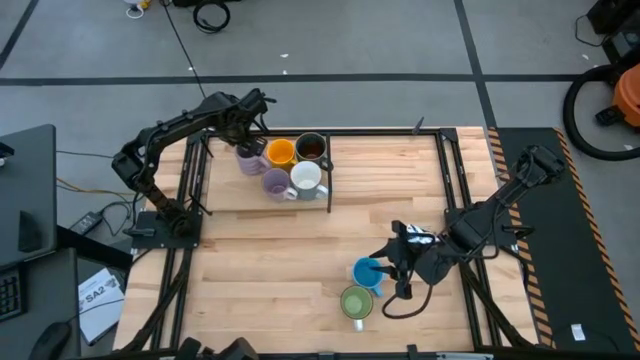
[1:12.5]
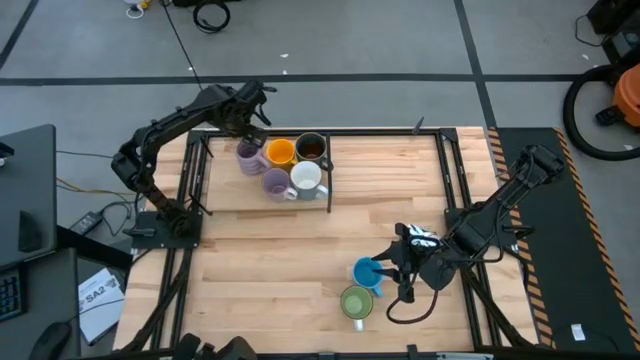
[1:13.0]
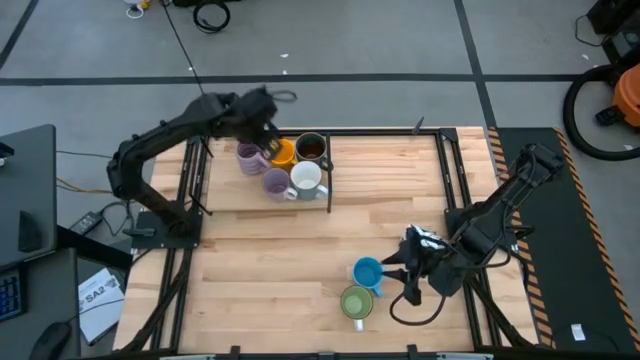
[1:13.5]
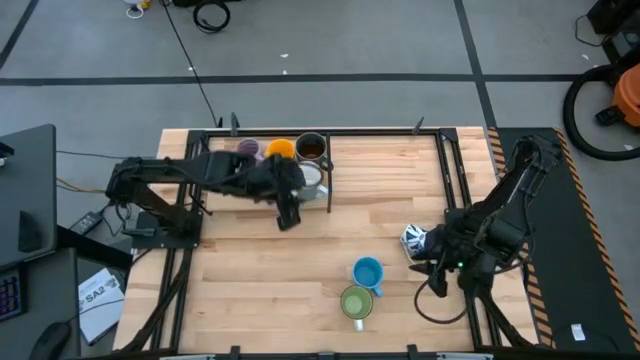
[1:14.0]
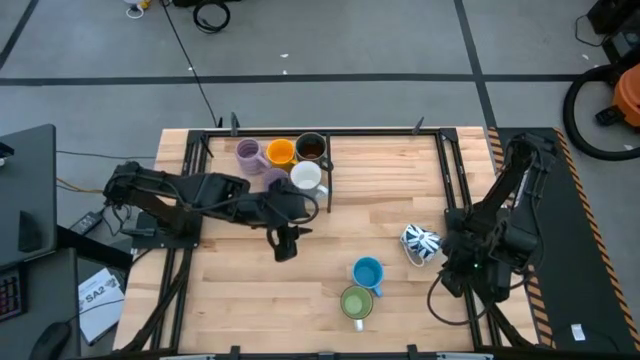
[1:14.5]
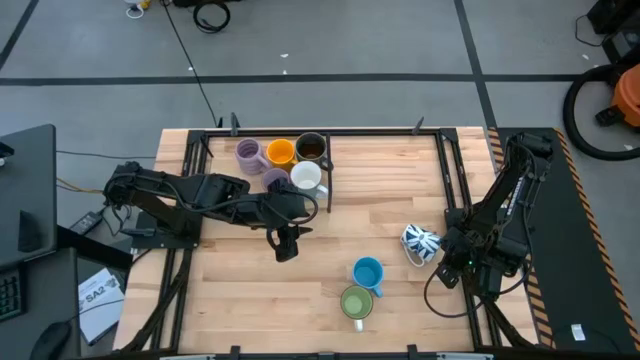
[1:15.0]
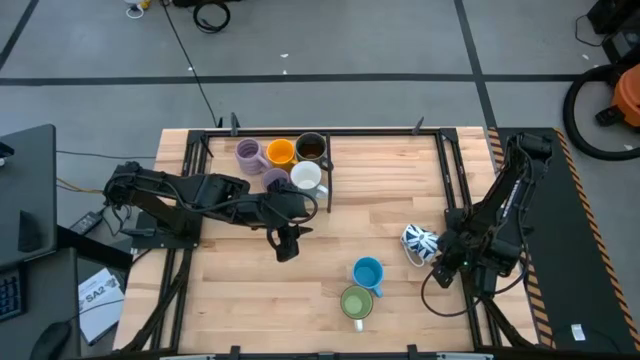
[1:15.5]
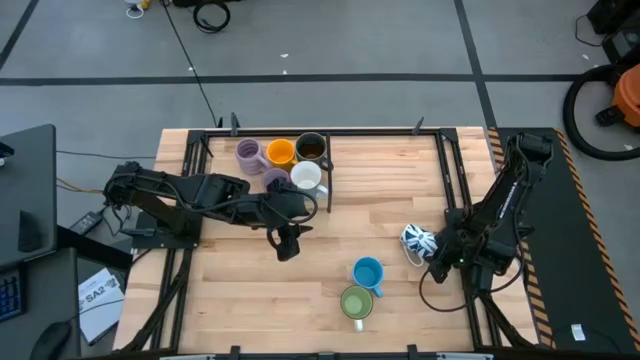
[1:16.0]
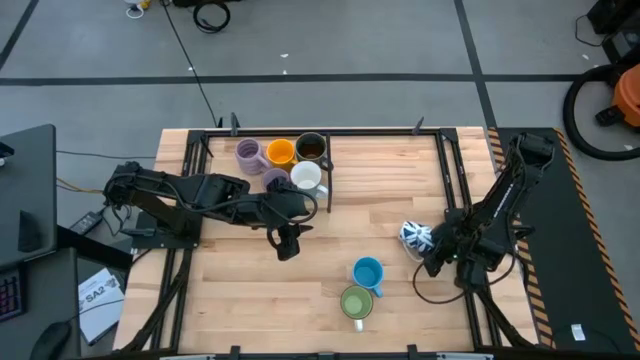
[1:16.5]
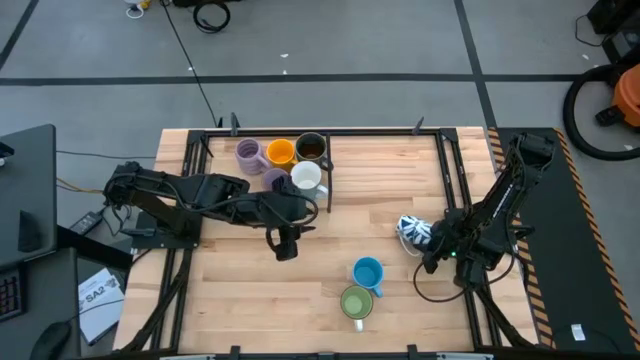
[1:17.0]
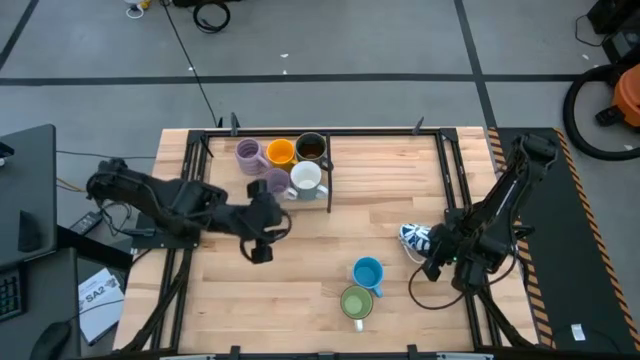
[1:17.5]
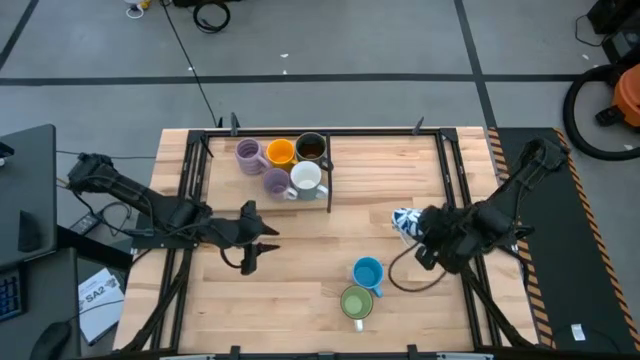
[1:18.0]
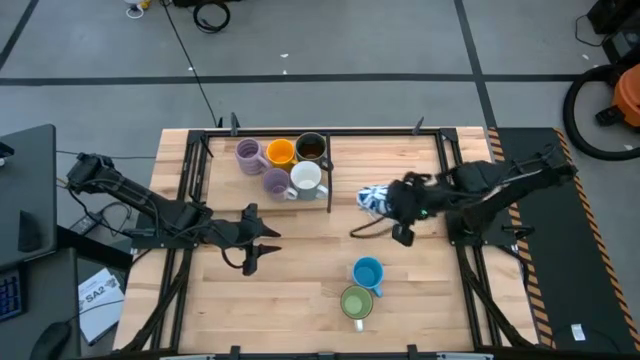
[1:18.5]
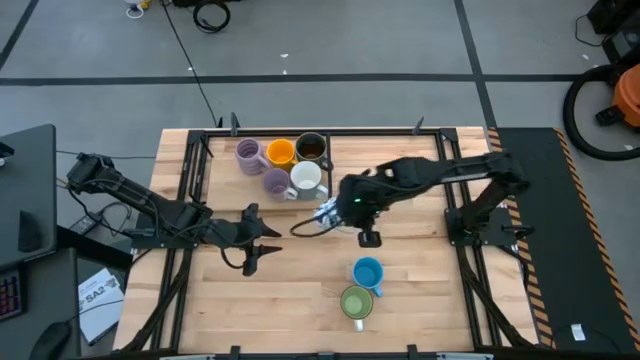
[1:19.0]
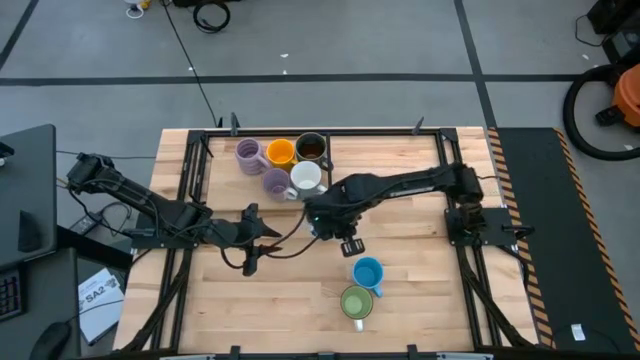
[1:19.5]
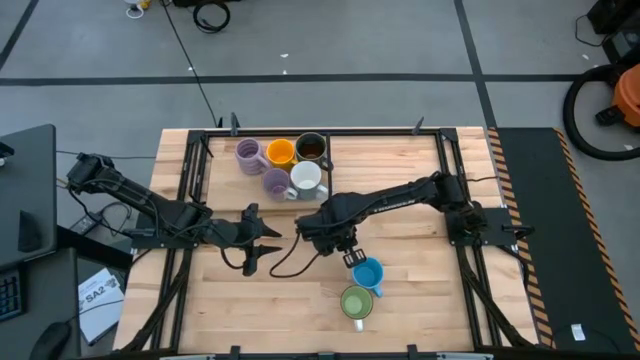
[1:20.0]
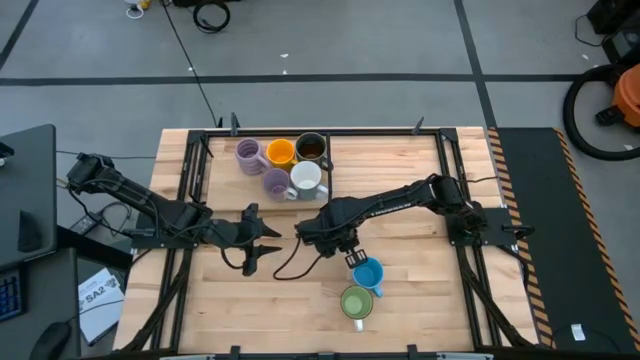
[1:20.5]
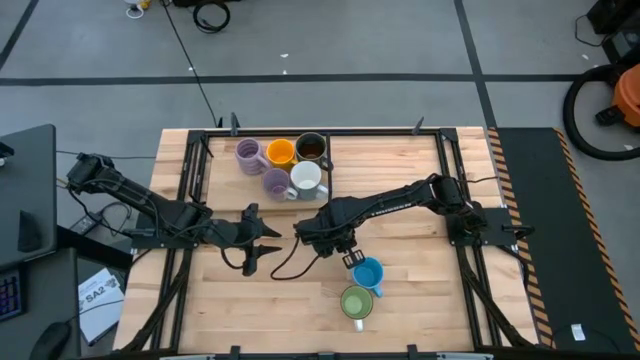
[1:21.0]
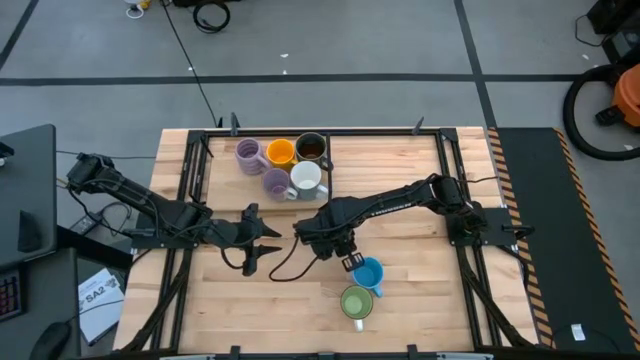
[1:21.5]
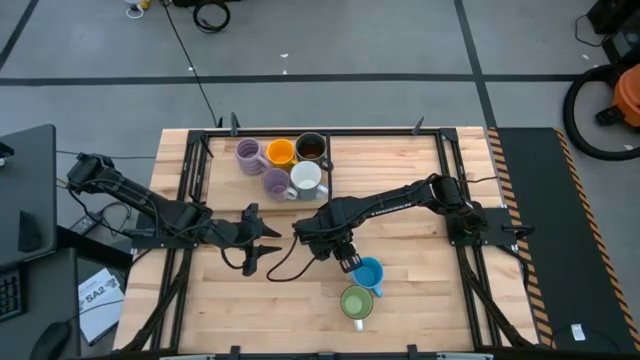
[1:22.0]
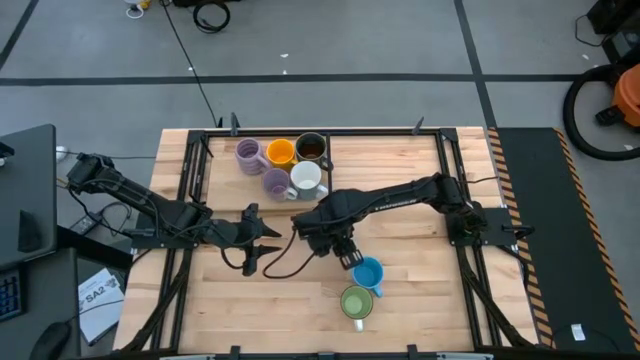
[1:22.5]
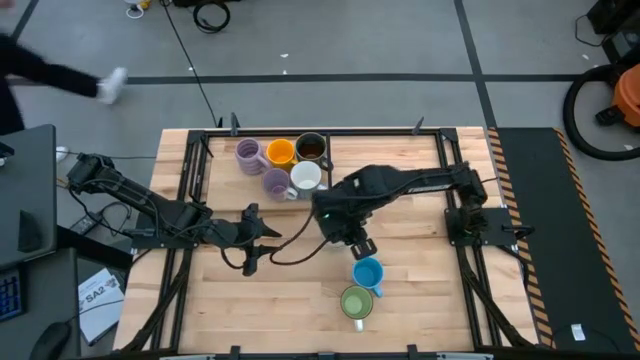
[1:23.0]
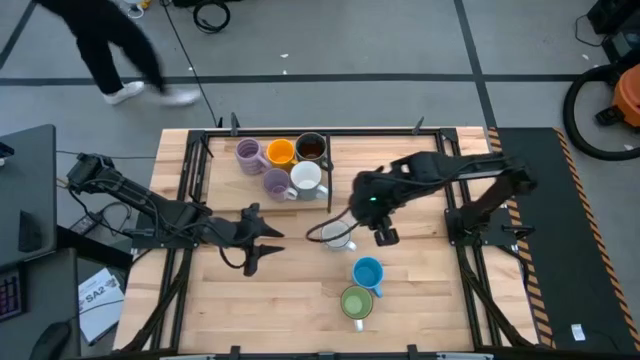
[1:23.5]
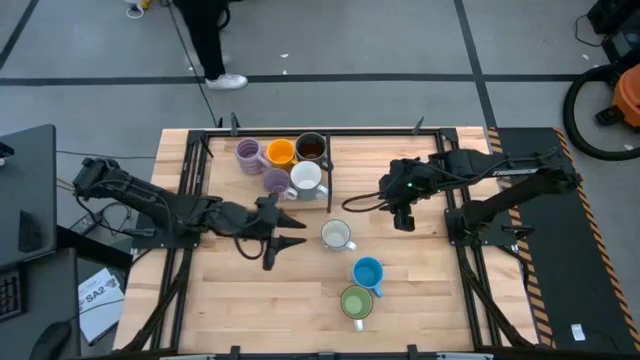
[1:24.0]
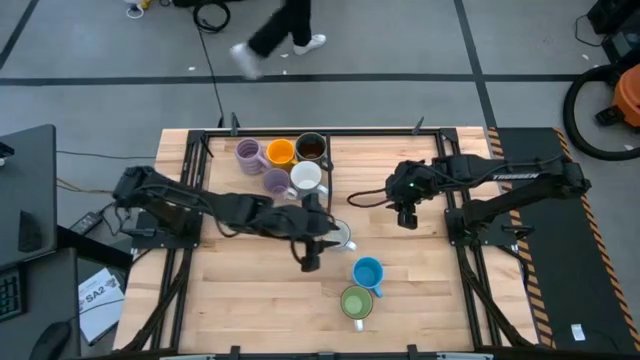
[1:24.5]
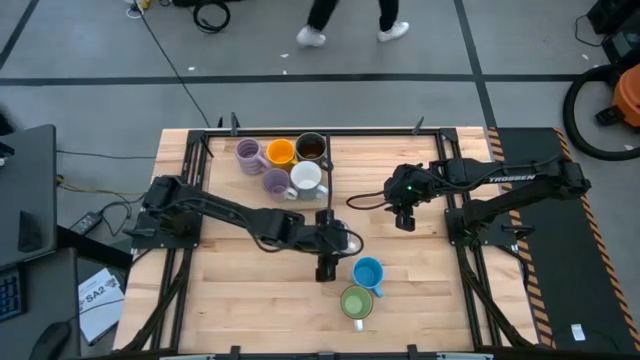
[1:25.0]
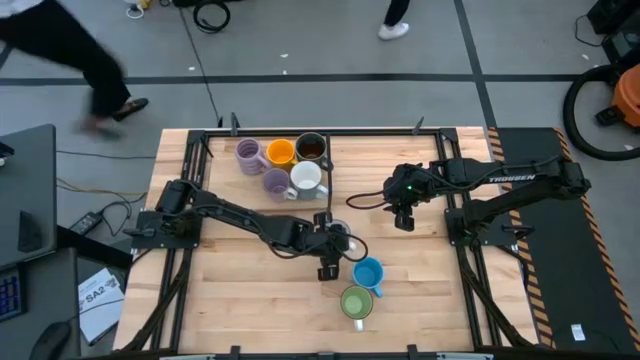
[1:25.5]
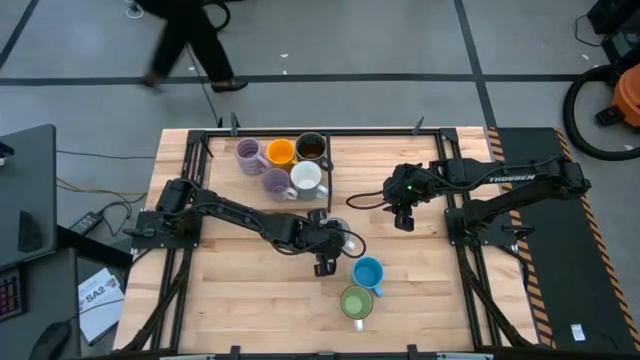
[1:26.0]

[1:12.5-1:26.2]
Task: Place coffee mugs
Put the patterned blue mug on the shelf

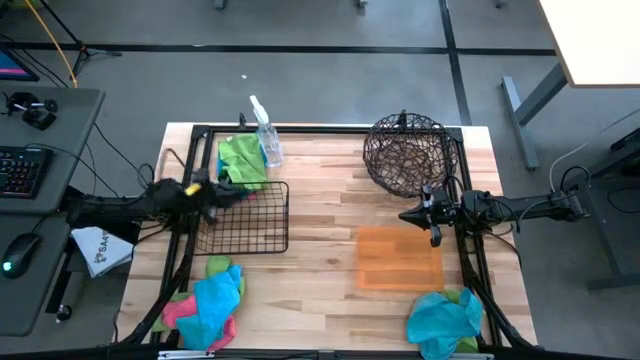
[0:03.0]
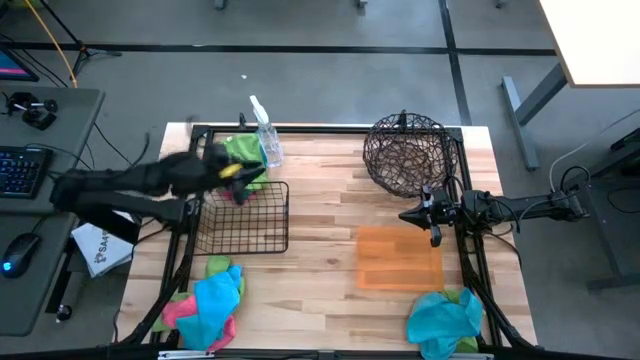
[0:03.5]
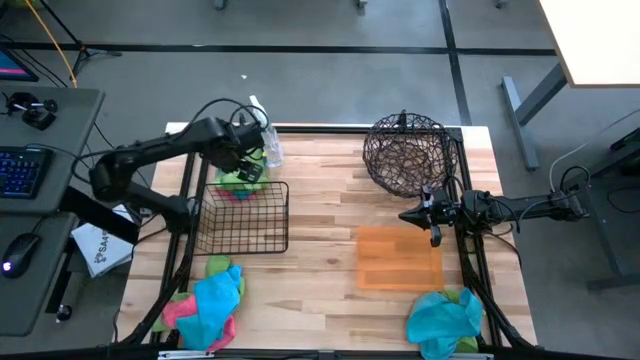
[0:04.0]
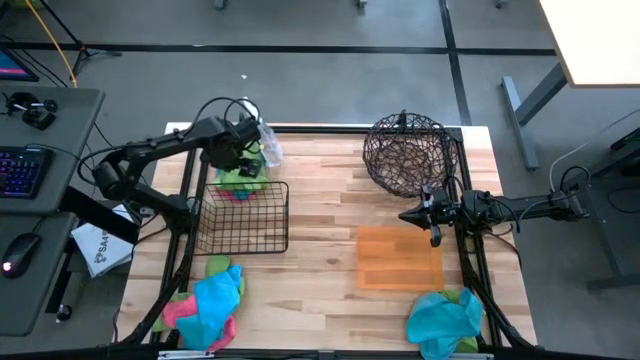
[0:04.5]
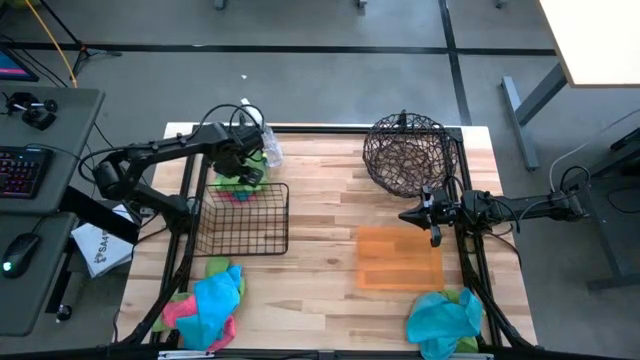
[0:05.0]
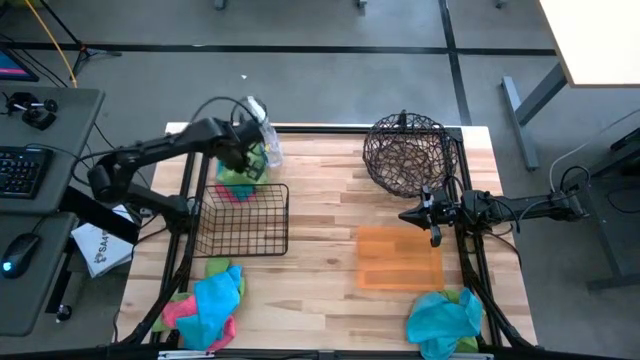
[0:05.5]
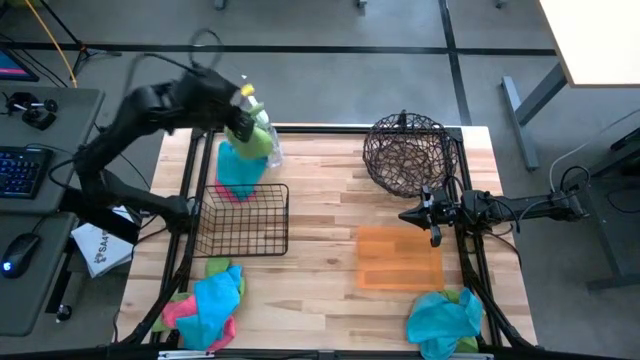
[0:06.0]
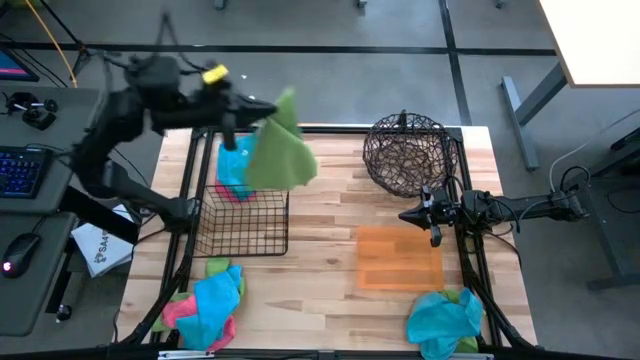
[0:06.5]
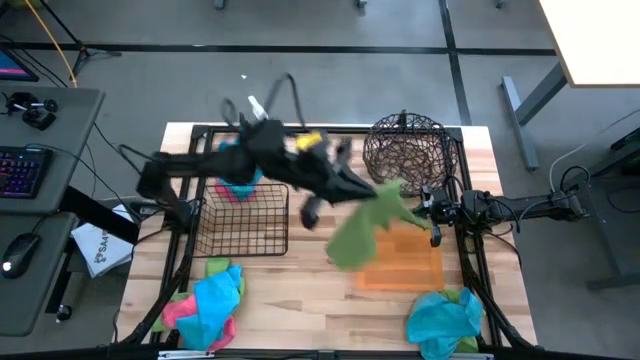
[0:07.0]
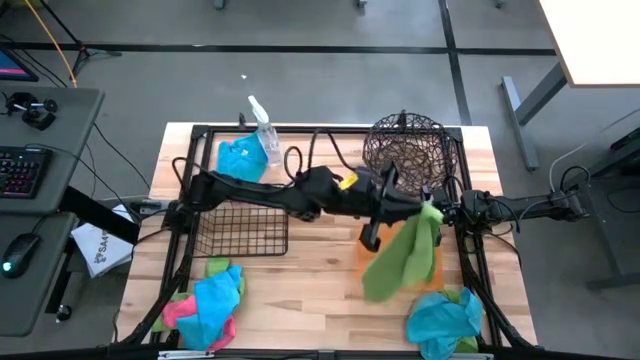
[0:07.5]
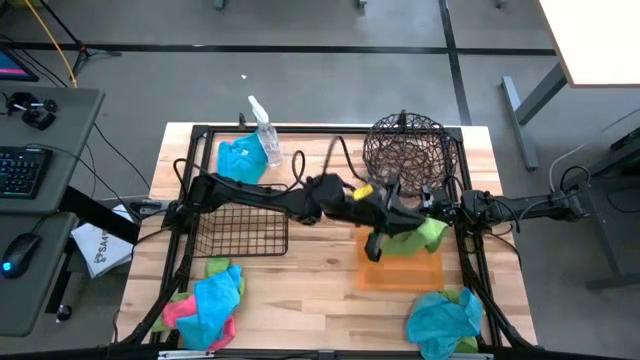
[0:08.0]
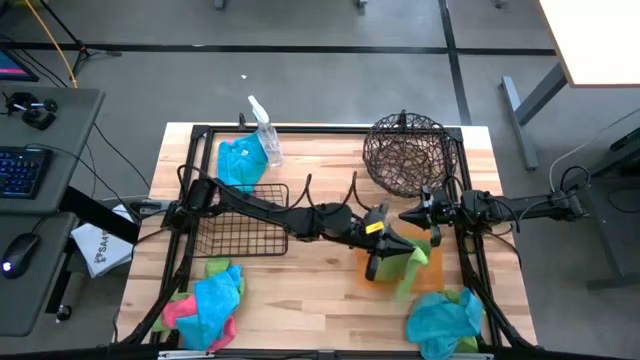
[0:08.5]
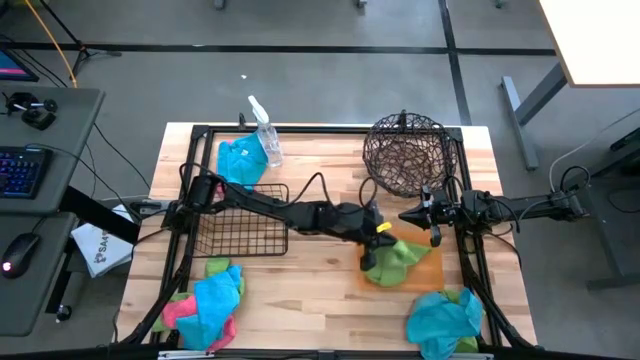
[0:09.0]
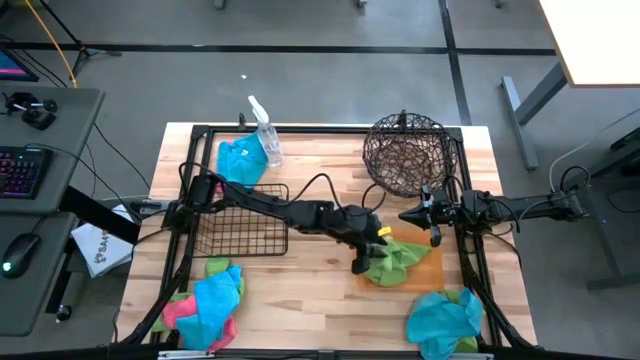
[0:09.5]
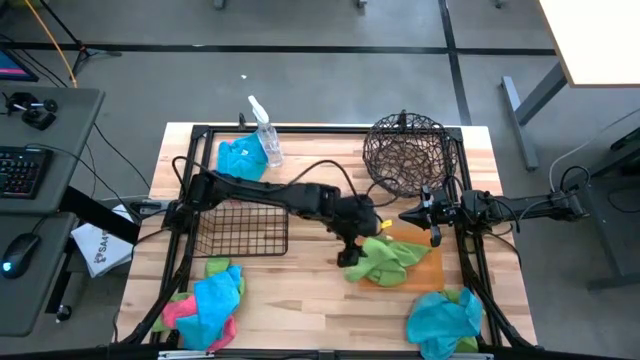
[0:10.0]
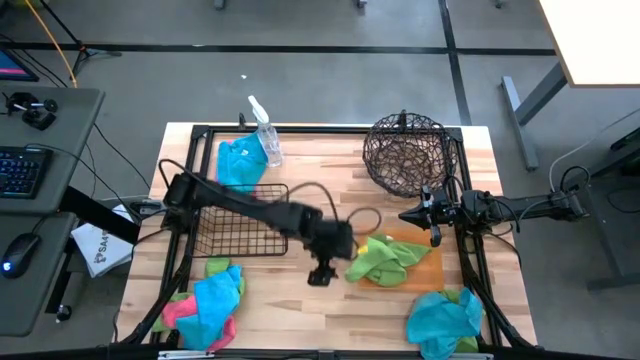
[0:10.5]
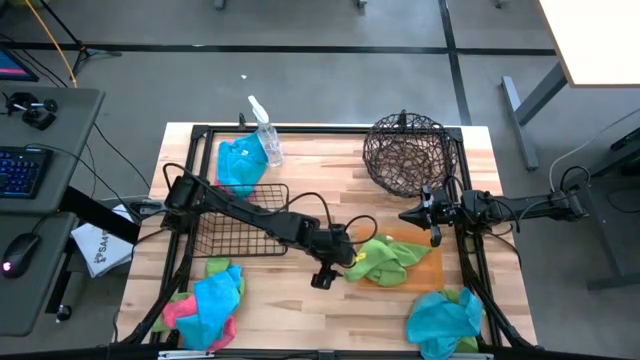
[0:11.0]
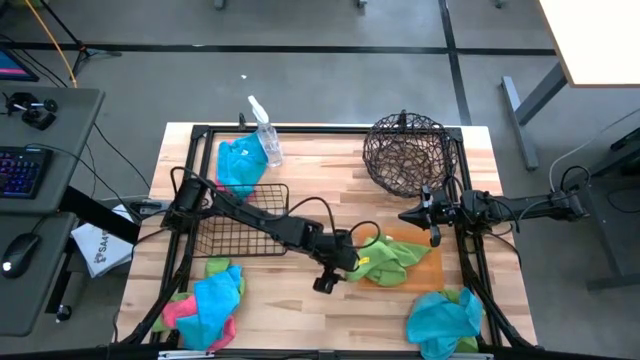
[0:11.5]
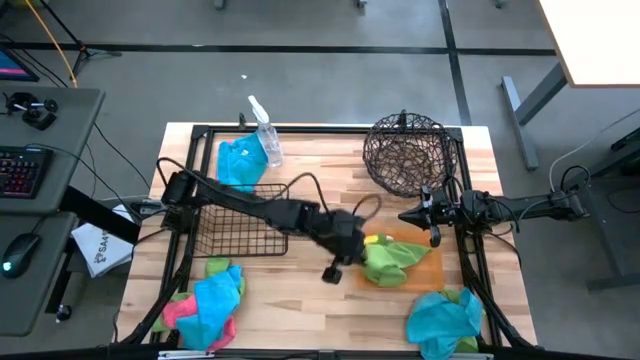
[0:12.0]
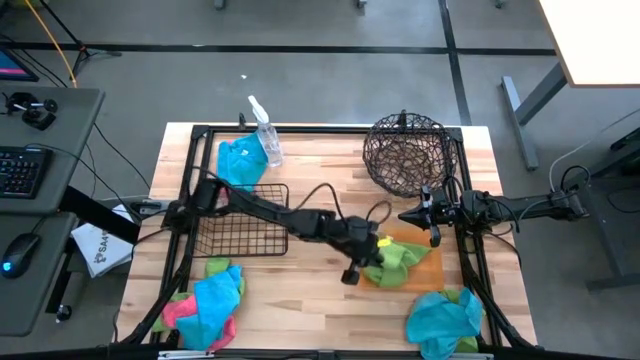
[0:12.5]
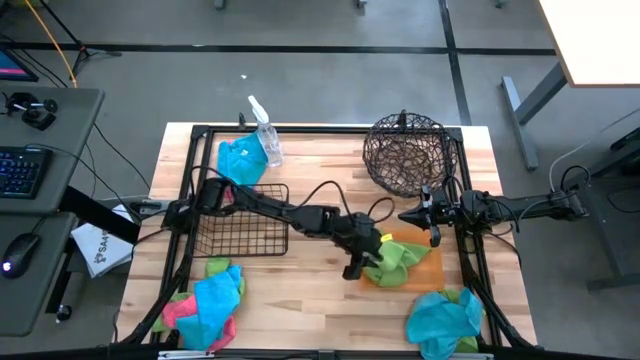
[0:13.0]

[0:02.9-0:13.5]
Task: Sort microfiber towel by color & place in baskets
Put the top green microfiber towel into the orange bin
